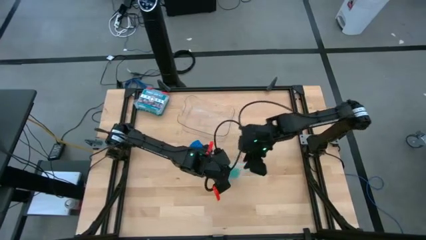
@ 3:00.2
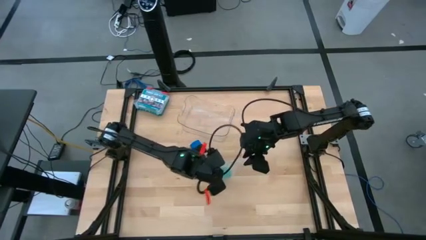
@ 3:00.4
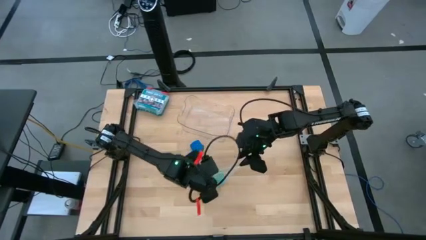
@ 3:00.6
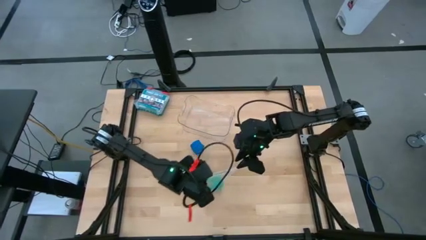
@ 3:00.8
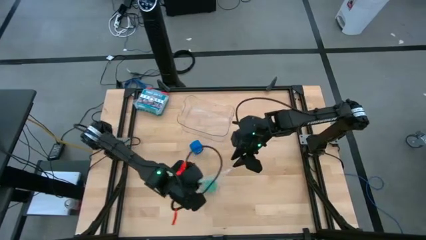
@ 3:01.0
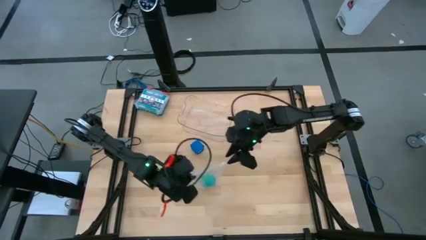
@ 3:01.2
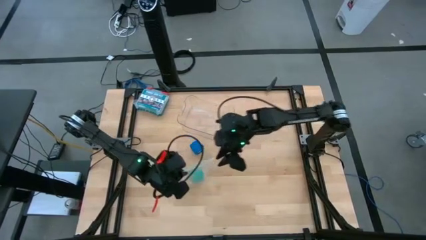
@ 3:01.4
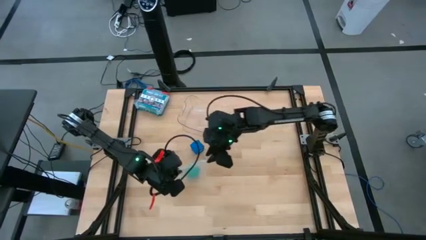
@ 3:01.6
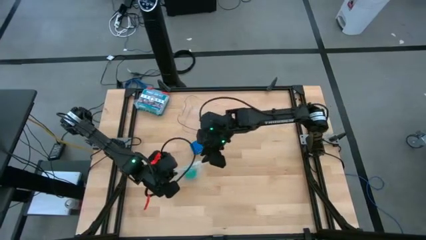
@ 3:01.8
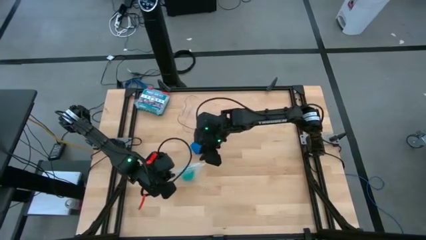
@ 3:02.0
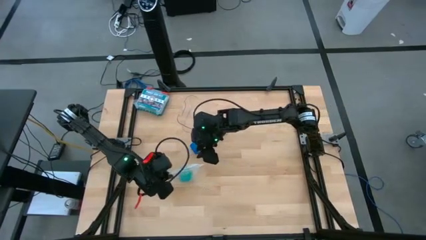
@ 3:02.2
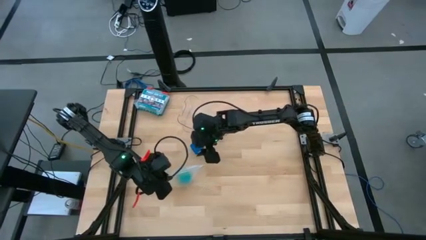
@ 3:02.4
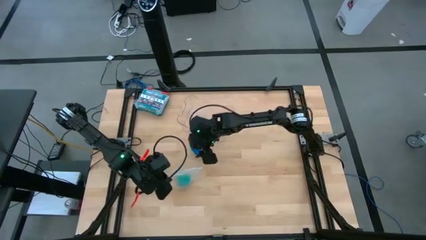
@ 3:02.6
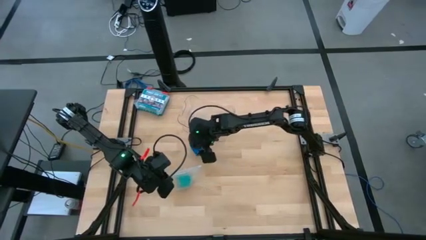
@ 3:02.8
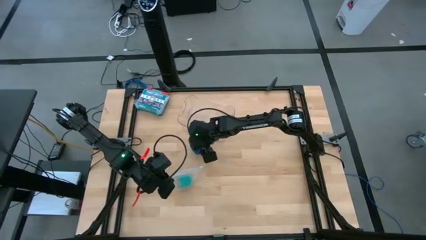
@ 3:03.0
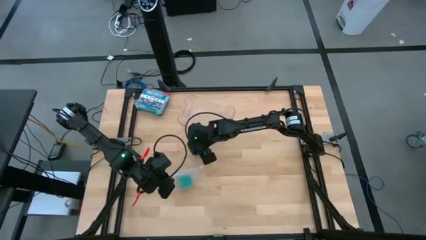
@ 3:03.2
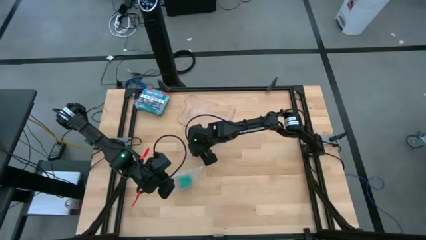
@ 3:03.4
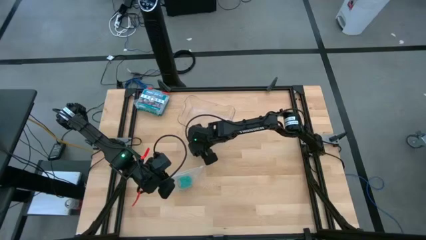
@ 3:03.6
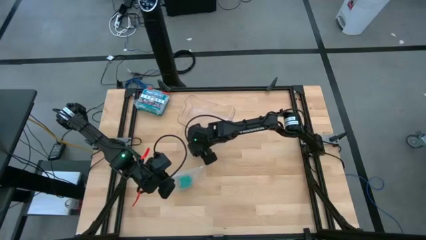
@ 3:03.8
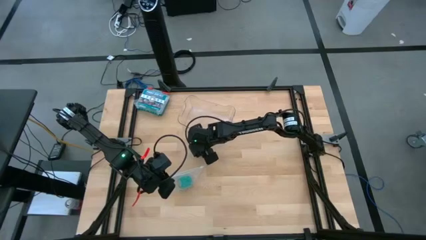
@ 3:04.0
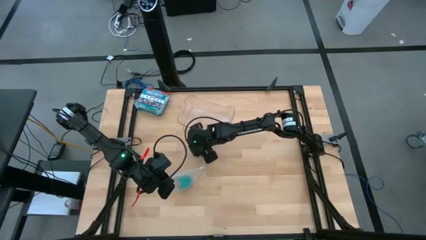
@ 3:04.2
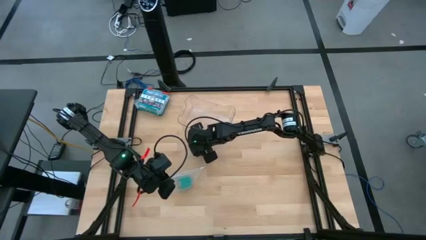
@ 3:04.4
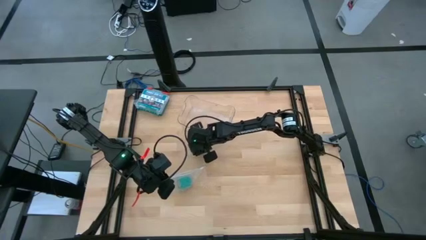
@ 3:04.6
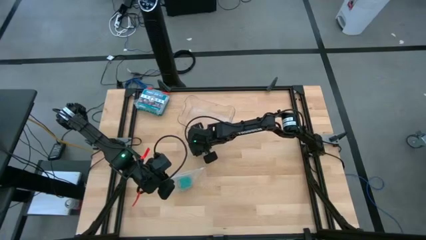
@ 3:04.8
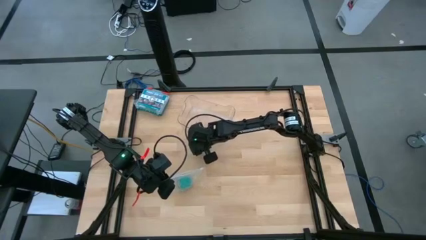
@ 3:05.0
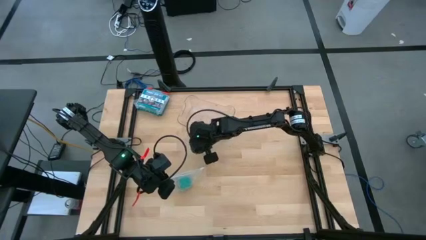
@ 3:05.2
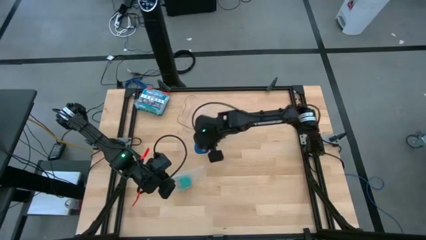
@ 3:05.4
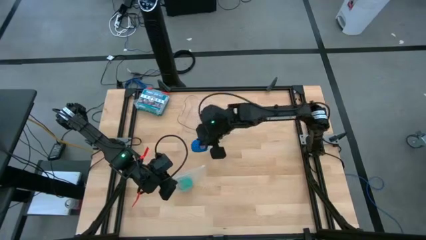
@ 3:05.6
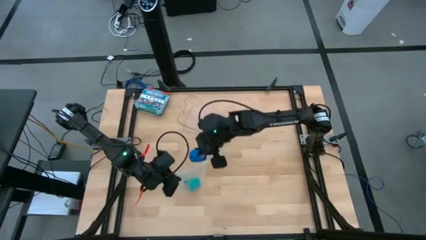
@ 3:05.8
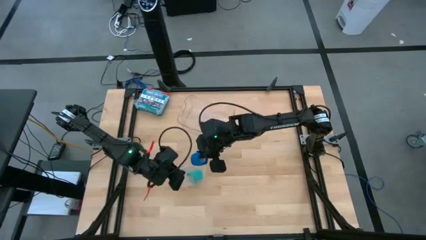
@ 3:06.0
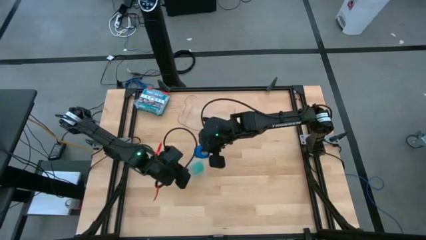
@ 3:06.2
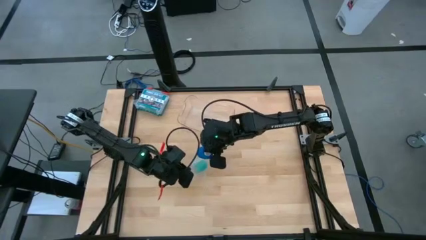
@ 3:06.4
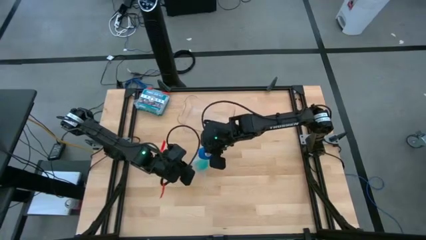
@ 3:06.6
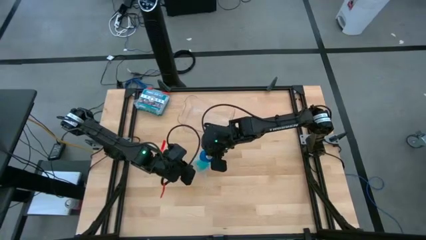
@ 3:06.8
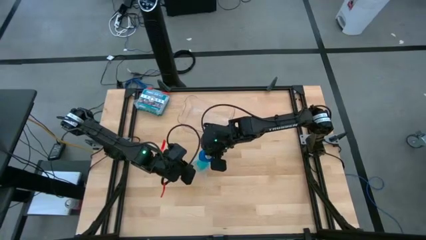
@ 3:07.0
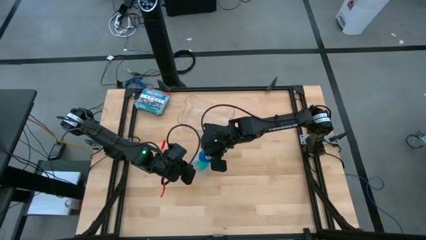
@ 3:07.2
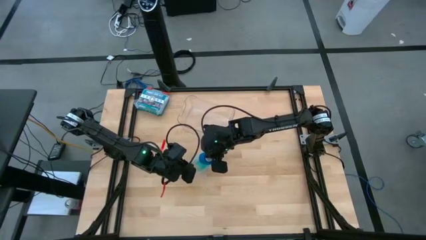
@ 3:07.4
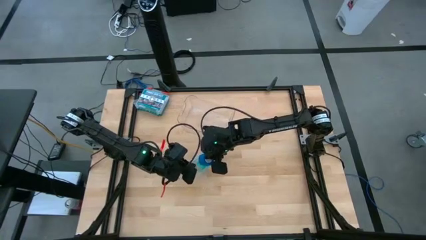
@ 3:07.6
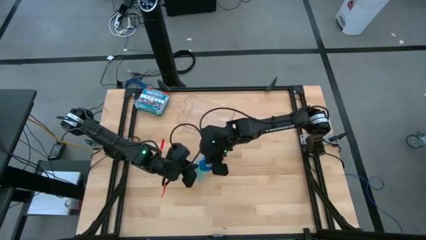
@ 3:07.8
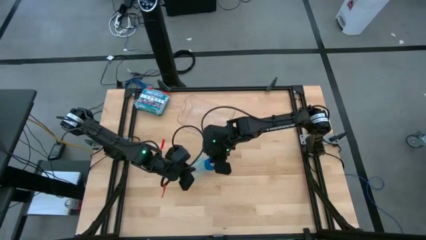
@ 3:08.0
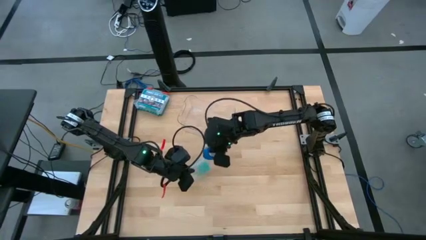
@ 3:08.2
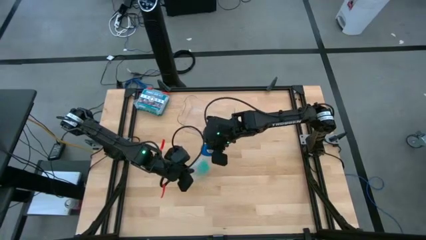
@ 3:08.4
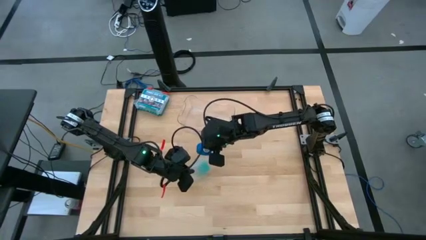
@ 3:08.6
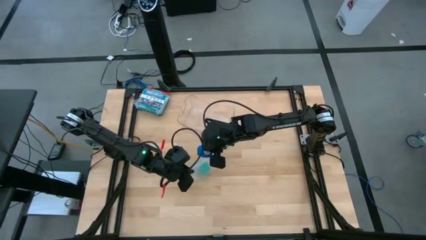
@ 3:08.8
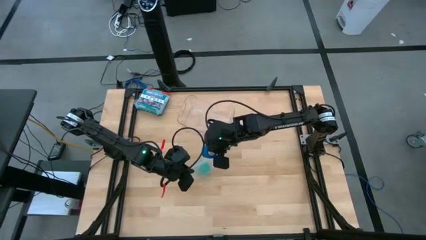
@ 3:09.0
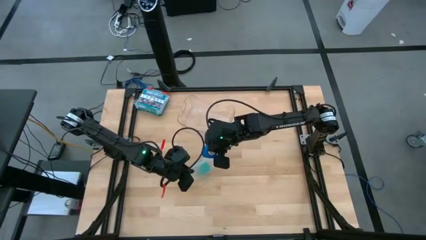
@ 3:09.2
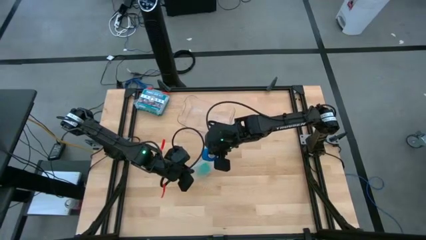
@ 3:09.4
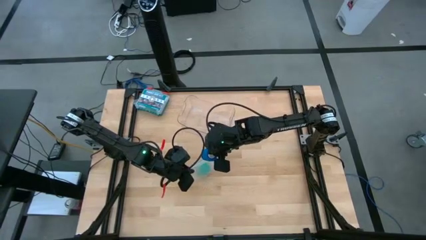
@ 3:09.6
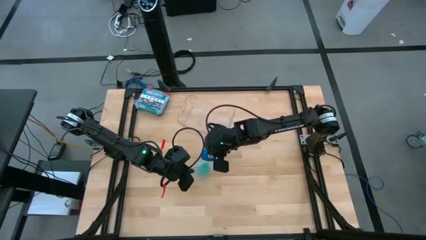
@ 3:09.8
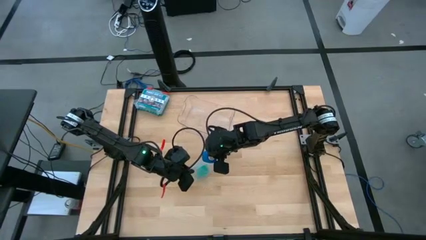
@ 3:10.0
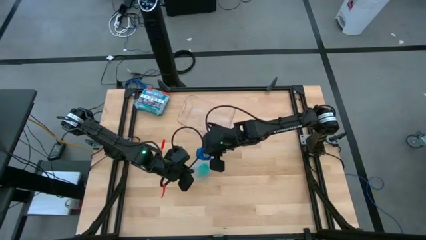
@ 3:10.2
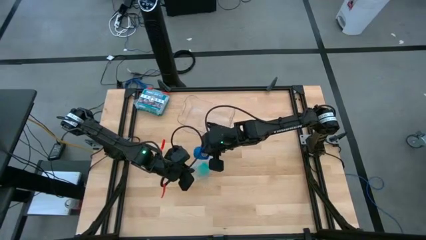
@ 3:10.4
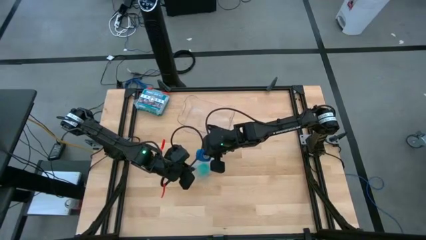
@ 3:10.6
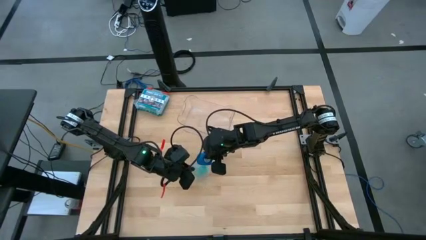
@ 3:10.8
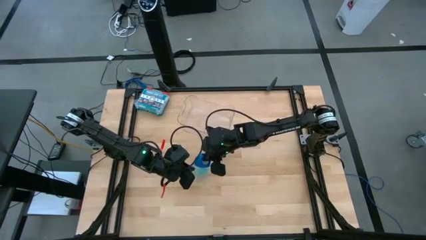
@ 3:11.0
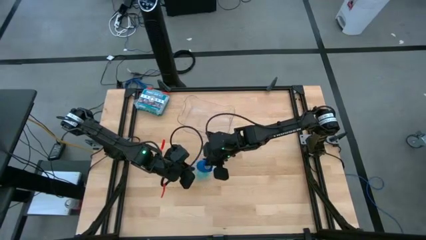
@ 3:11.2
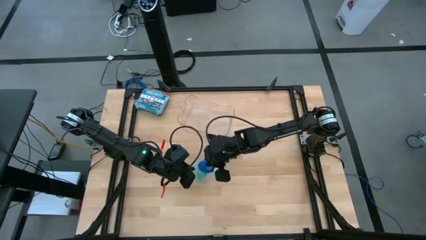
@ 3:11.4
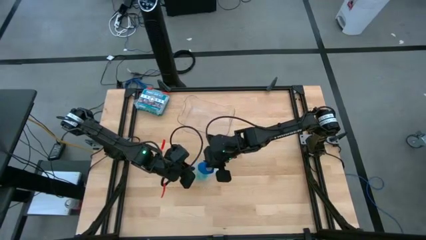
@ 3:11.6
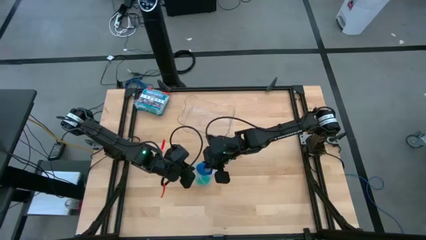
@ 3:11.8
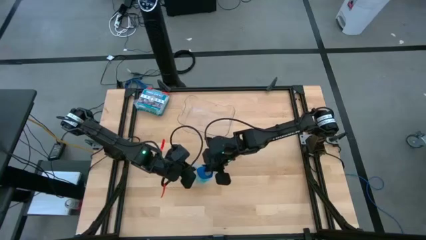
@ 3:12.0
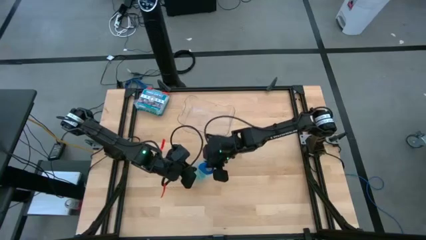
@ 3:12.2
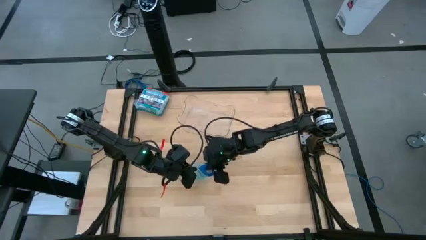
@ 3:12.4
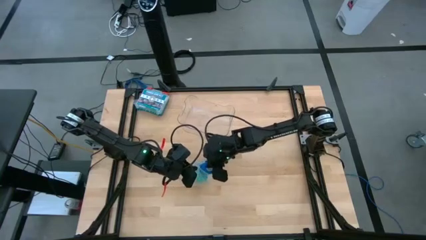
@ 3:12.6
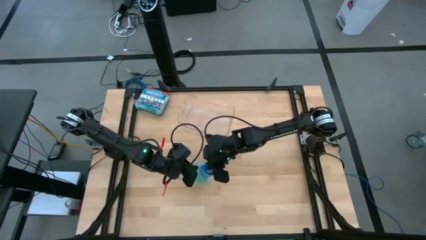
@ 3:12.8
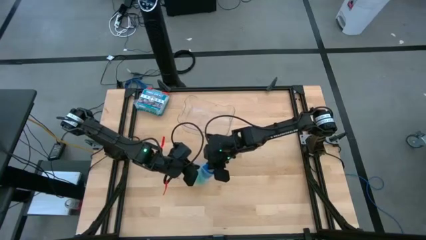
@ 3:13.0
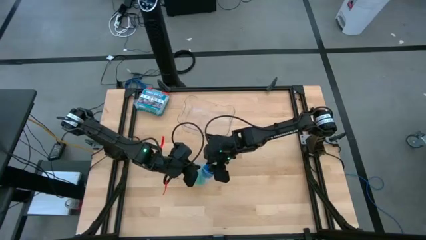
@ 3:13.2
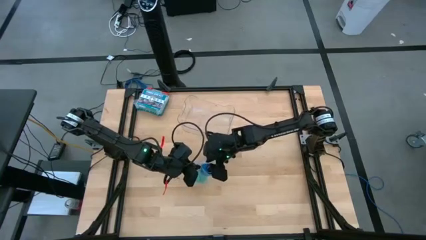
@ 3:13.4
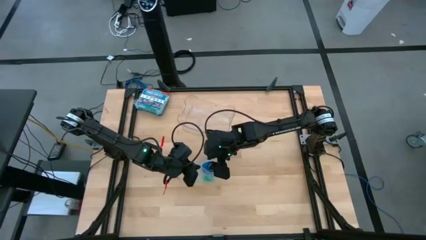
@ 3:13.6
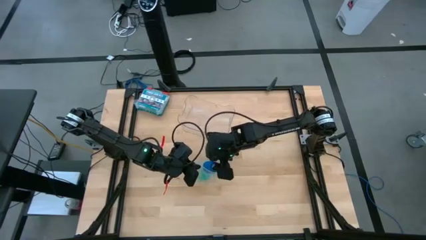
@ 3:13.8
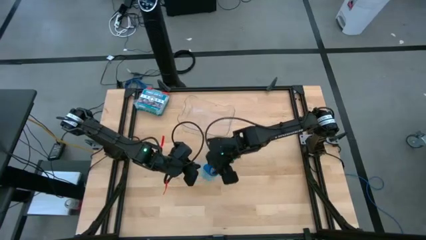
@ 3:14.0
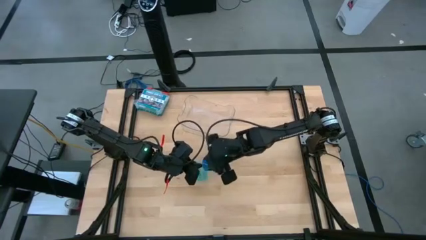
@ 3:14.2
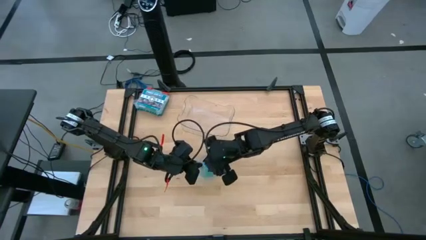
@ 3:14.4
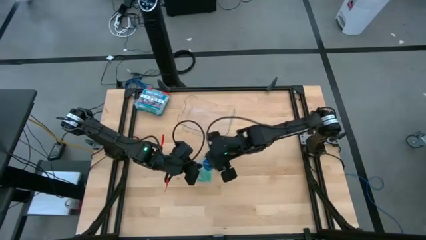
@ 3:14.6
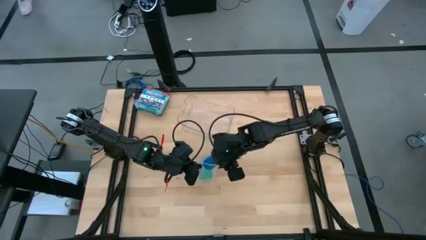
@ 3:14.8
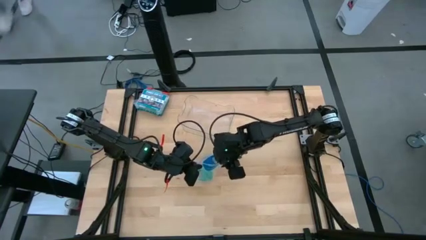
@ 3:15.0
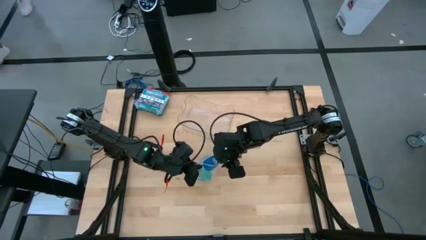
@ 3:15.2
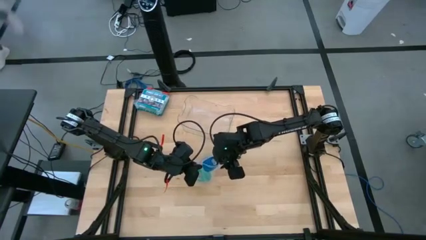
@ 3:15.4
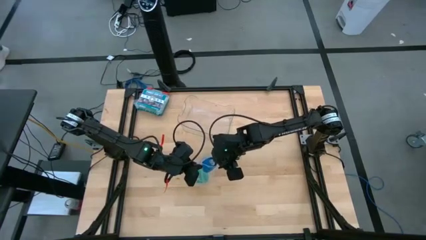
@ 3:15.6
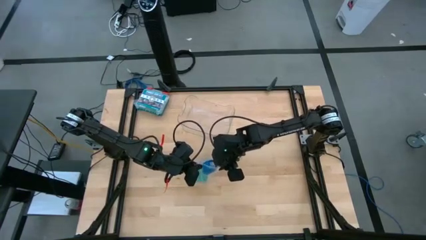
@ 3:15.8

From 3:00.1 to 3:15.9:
Task: Roll bandage
Put the blue bandage into the transparent zip bag
